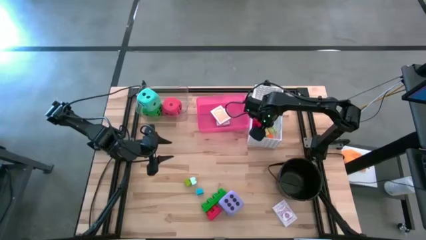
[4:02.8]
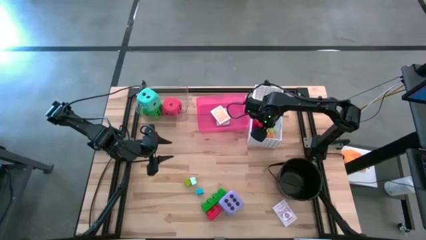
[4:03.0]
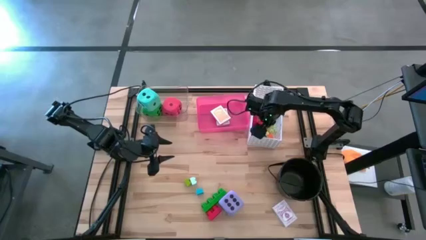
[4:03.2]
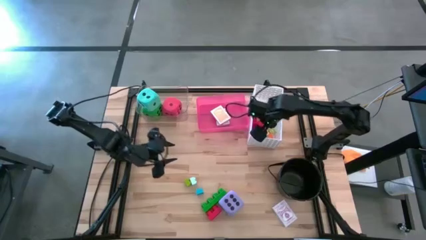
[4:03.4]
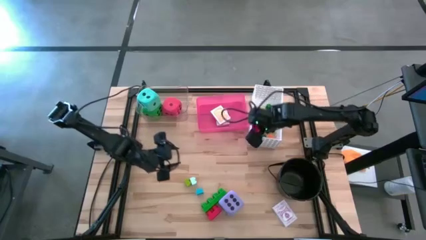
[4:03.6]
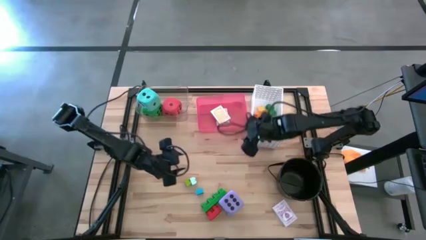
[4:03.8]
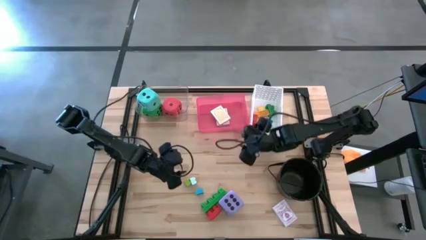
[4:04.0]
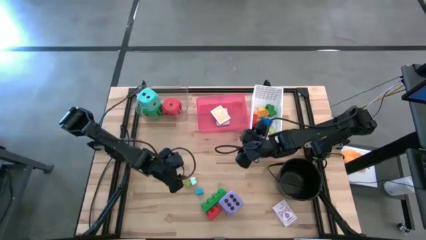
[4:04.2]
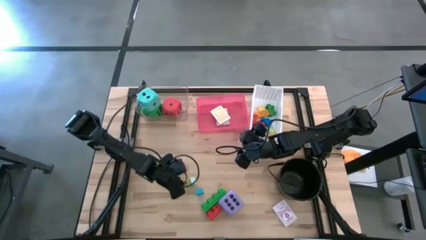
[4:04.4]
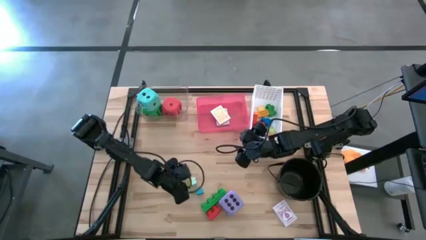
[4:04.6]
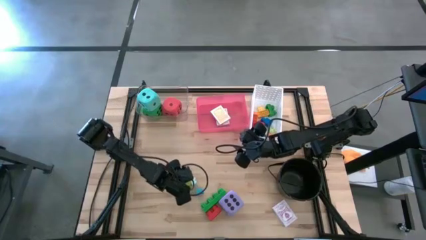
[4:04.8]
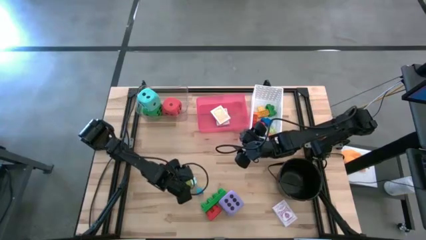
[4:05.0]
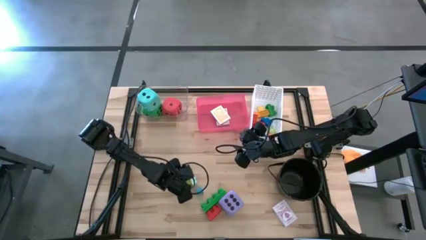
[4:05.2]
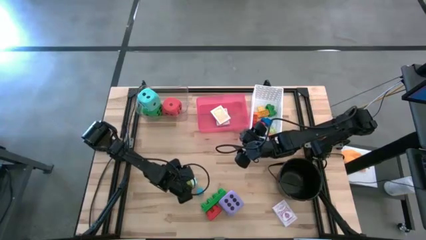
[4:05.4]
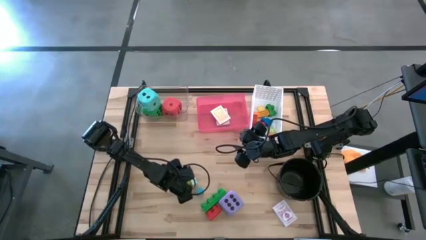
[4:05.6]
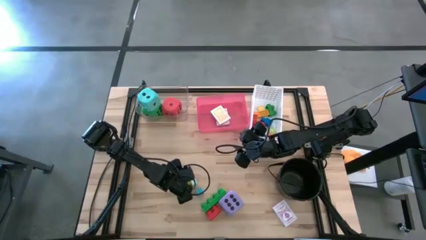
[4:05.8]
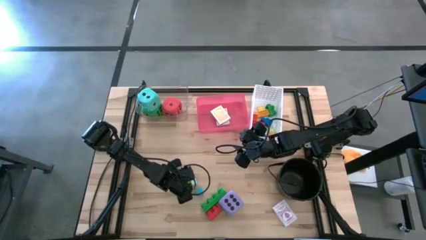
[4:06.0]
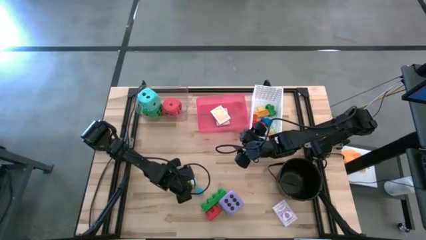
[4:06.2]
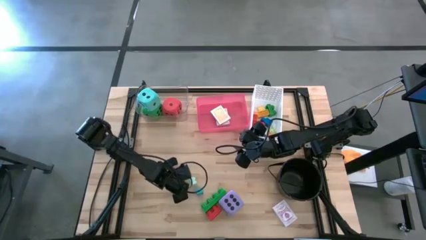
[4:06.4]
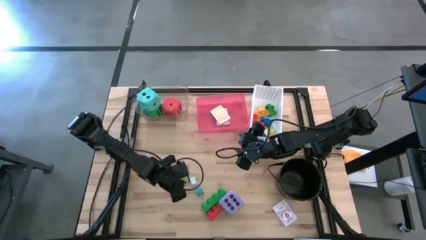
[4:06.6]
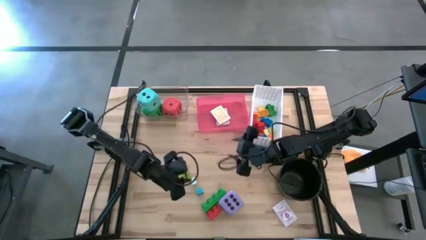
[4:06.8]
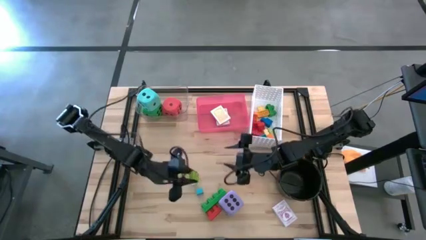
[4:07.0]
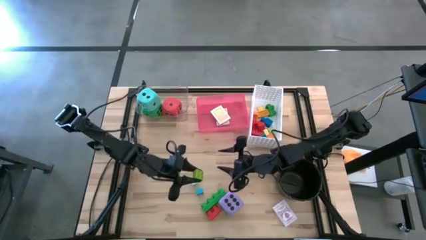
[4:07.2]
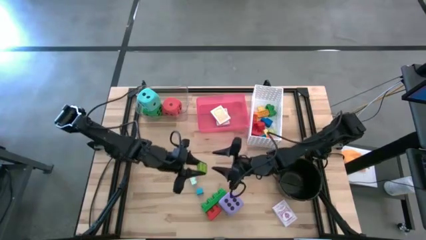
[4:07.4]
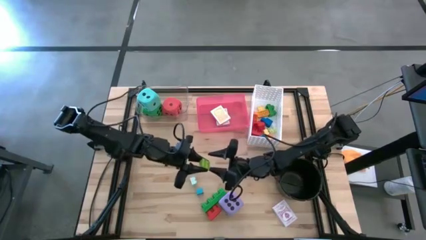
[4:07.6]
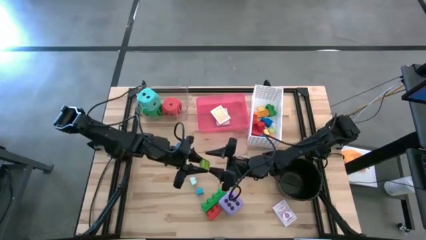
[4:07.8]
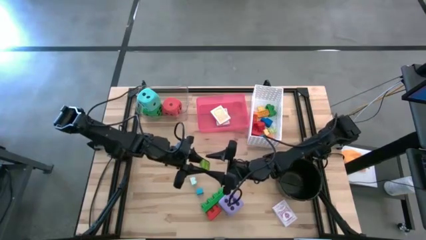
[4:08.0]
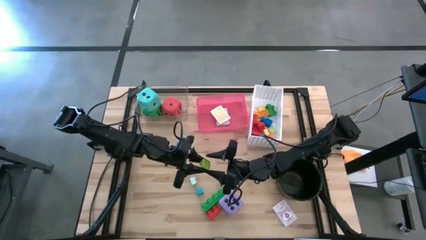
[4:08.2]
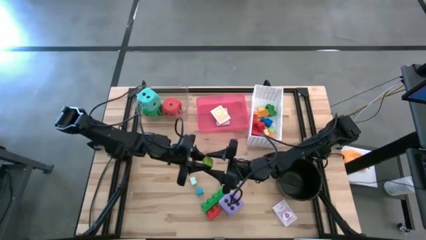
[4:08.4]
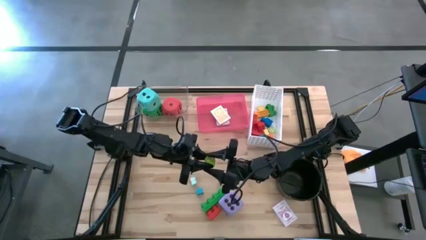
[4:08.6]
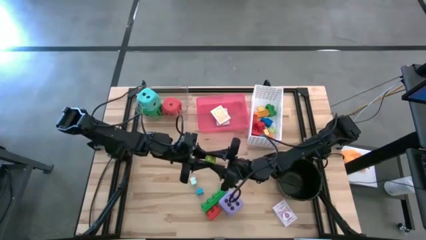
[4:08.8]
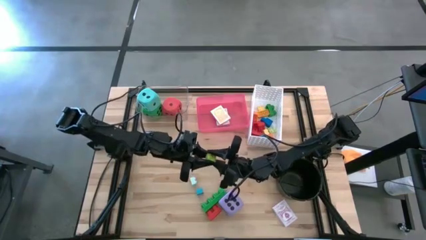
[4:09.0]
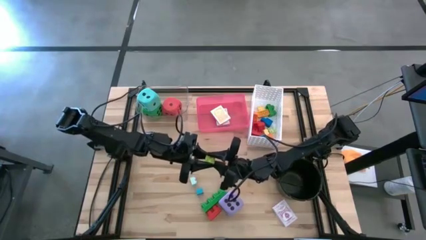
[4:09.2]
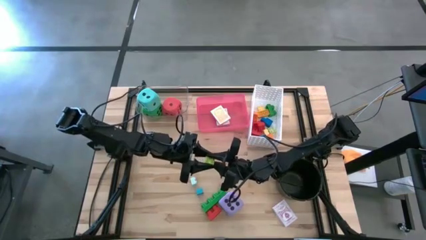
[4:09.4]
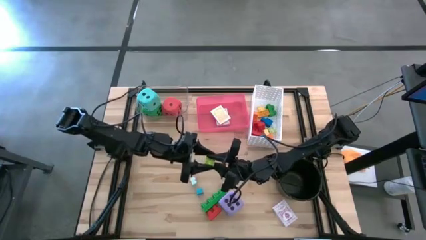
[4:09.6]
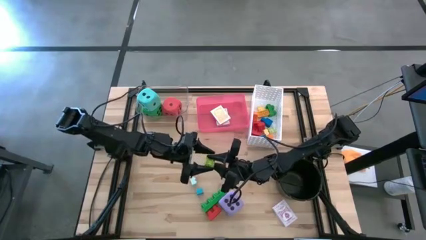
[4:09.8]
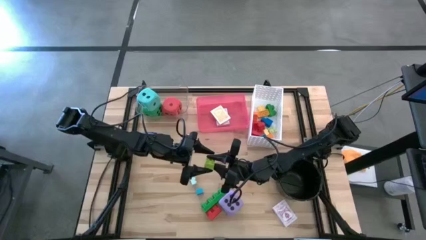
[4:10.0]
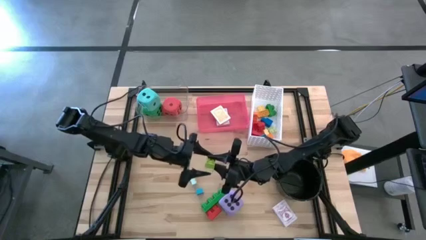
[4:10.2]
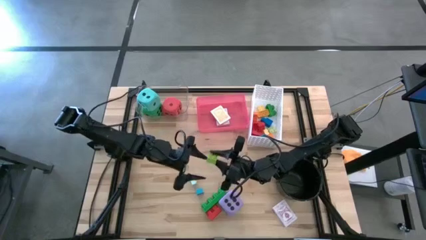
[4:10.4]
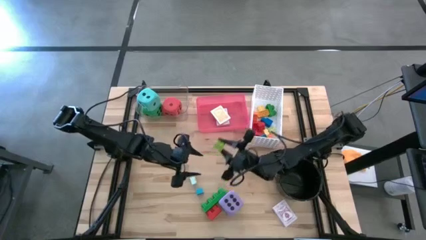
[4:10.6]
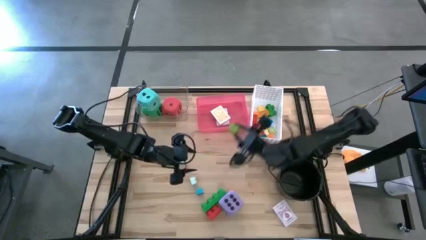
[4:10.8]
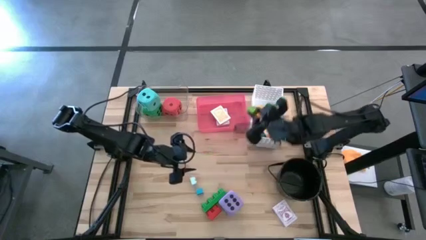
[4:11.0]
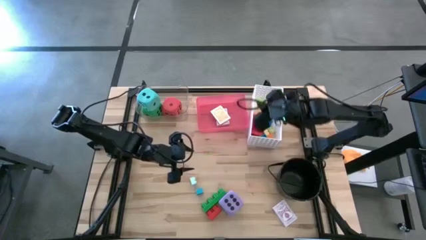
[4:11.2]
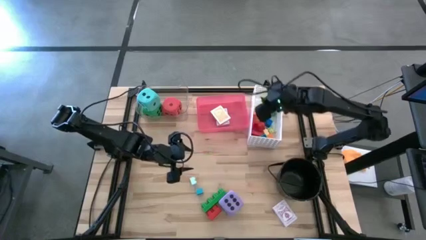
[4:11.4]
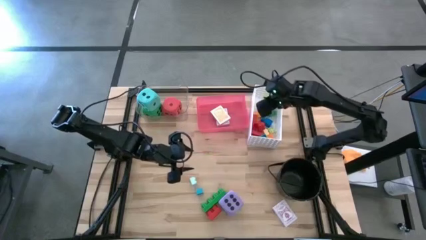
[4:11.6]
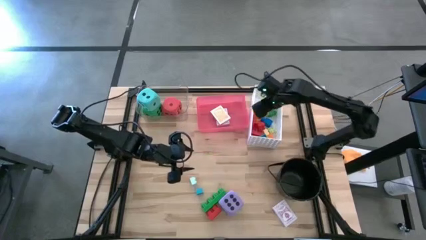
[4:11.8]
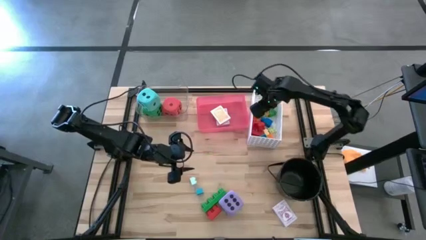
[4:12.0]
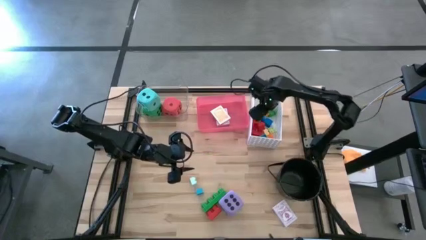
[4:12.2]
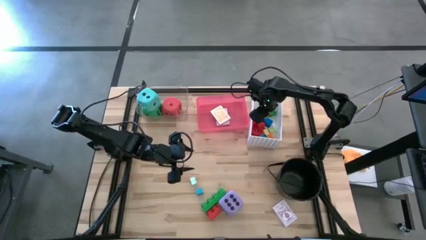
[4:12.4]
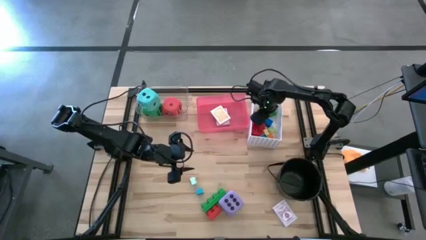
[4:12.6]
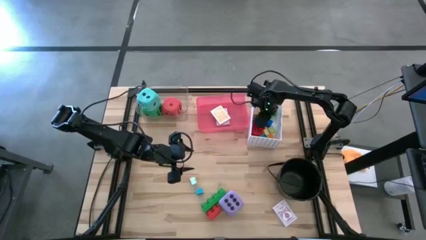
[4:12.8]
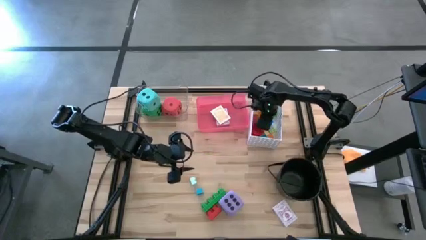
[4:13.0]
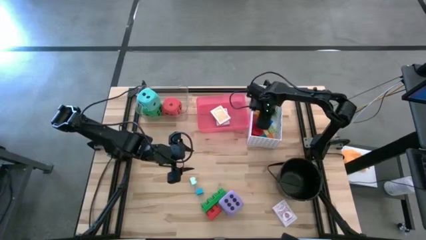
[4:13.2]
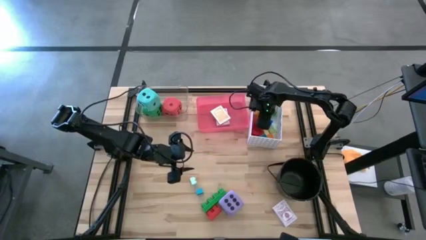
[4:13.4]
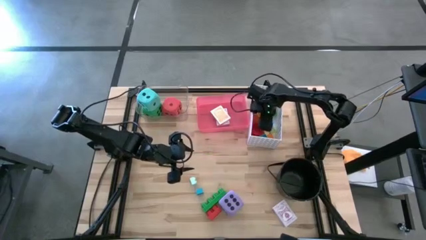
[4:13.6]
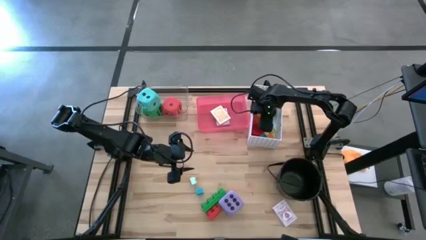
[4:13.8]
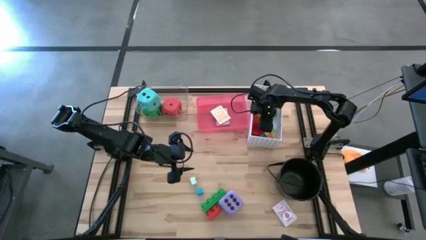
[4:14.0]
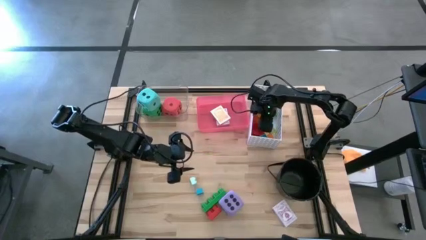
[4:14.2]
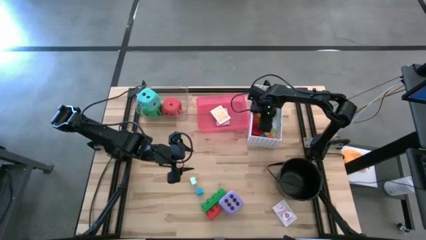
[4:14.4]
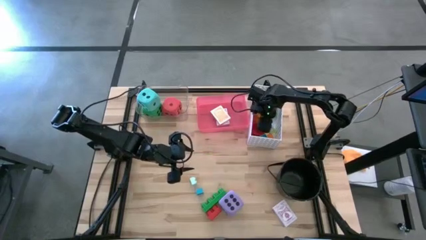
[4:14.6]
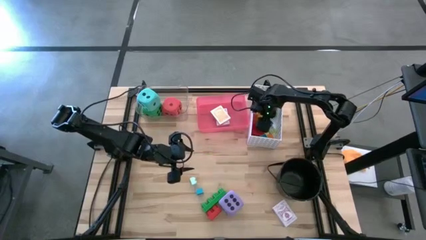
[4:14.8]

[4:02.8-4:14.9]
Task: Pick & Place Toys
Put the small green game piece into the white bin

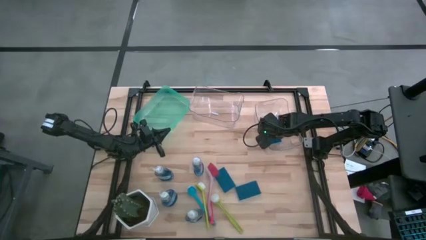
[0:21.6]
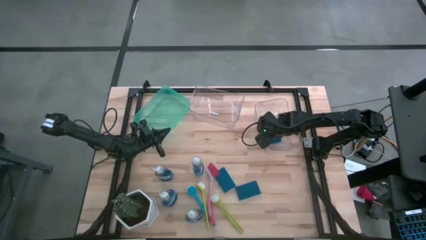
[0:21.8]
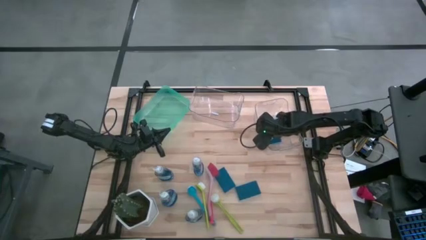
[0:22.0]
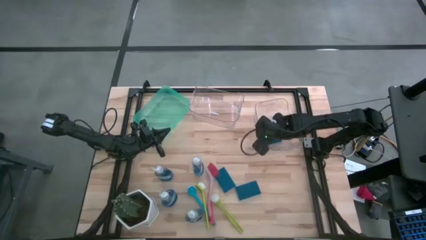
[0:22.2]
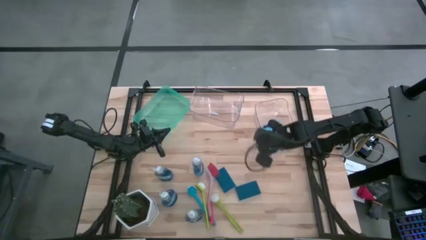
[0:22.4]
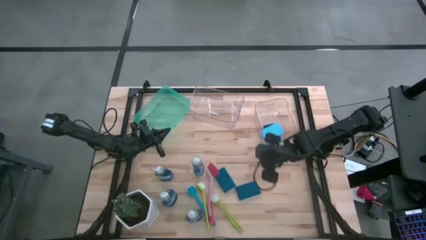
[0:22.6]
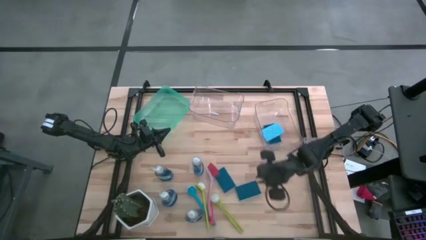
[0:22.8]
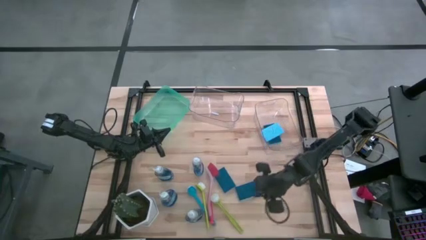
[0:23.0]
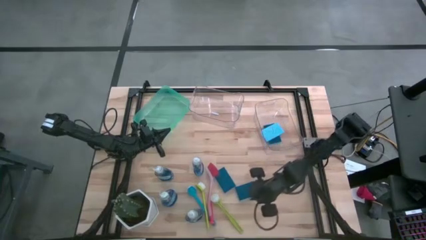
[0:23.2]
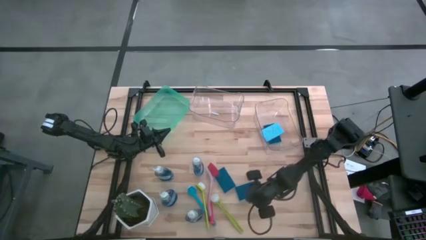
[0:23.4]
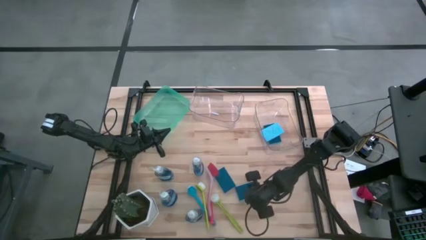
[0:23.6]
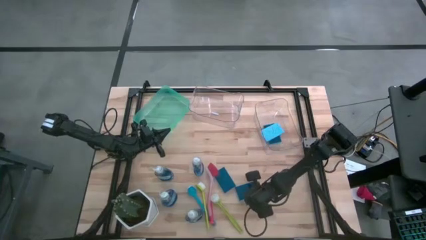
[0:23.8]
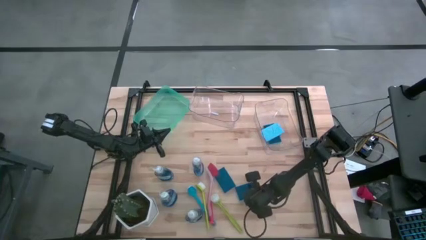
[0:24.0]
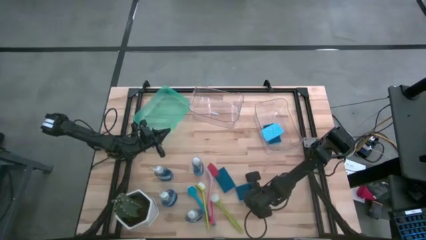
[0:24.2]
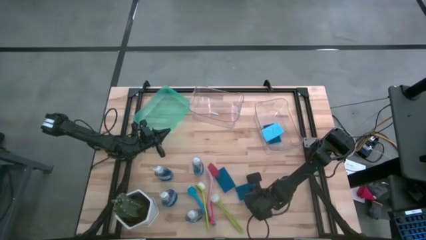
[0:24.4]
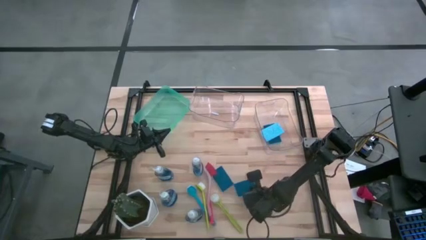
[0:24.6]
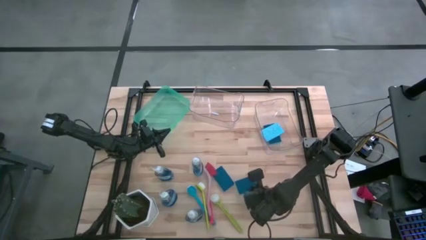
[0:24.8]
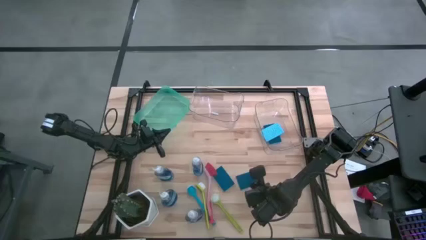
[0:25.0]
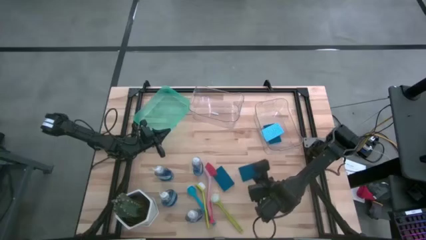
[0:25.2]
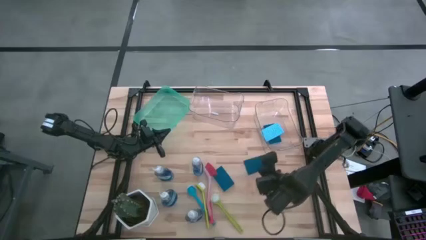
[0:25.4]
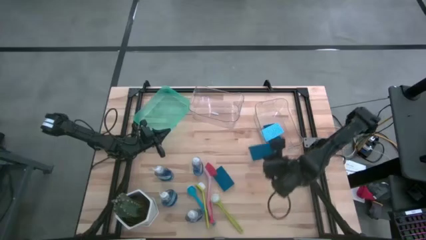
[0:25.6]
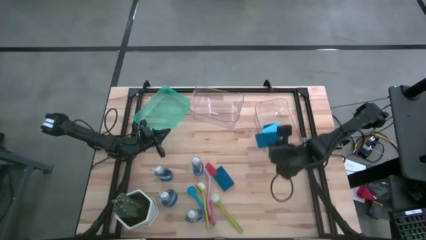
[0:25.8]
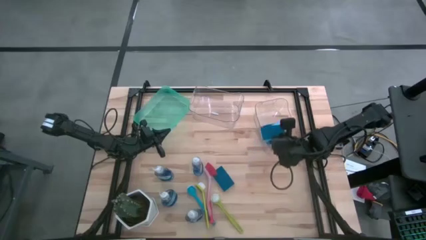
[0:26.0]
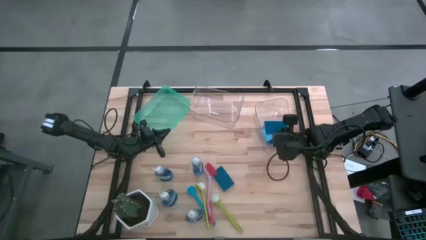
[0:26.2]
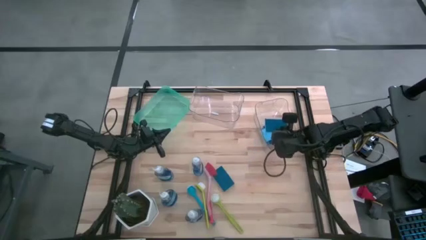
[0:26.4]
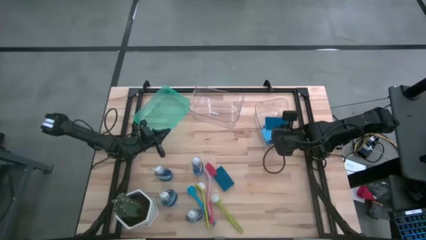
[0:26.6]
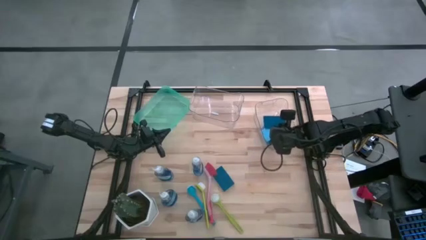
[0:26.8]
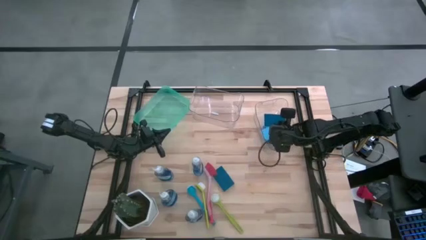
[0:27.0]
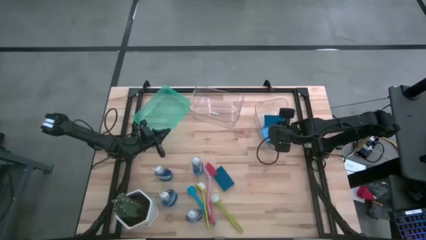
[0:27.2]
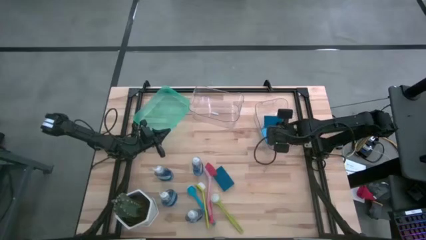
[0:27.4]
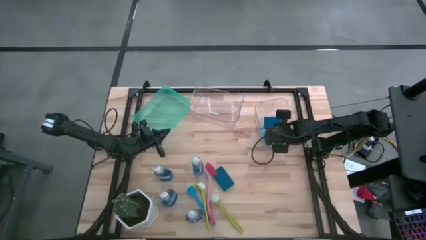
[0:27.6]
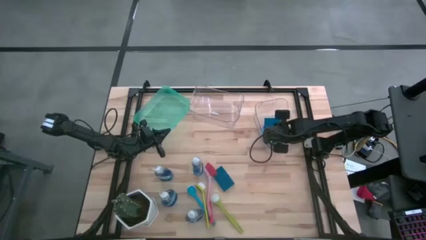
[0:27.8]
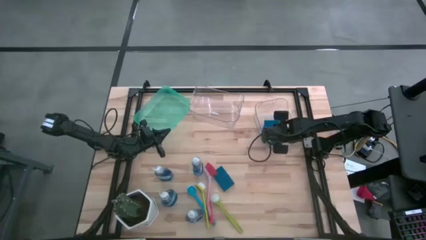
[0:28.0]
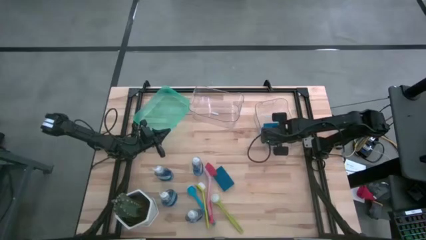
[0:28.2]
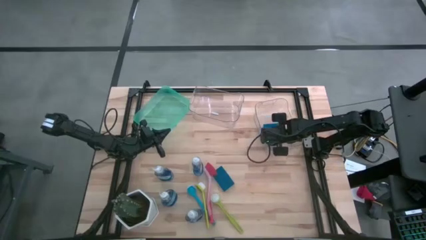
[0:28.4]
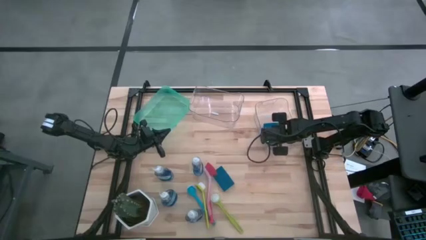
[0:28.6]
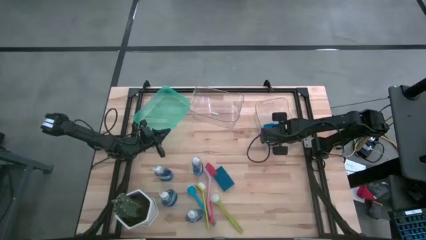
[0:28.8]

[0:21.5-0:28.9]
Task: Pick & Place Kitchen Sink Supplies
Put the blue sponge in the right transparent bin
